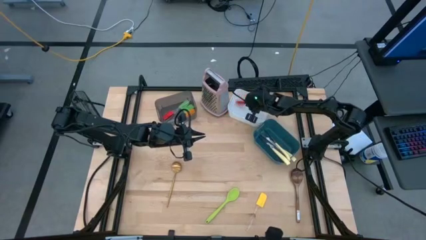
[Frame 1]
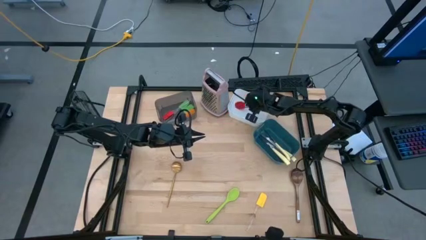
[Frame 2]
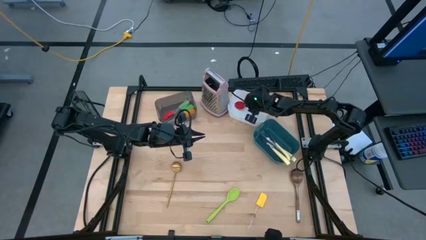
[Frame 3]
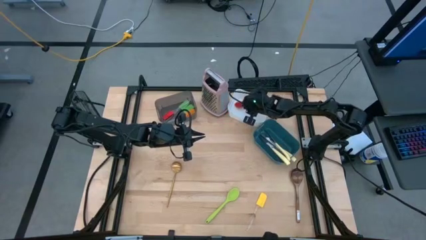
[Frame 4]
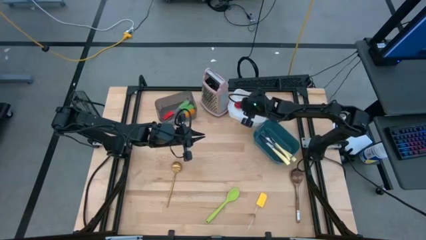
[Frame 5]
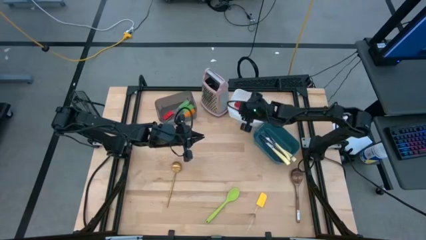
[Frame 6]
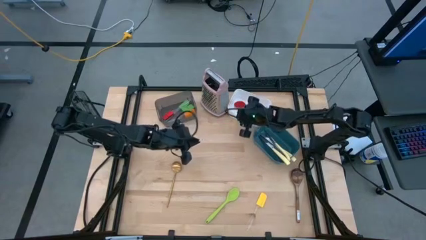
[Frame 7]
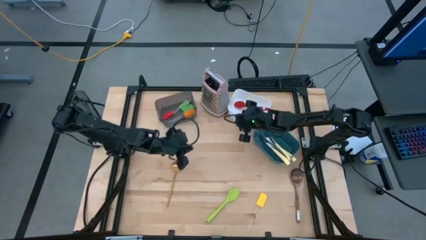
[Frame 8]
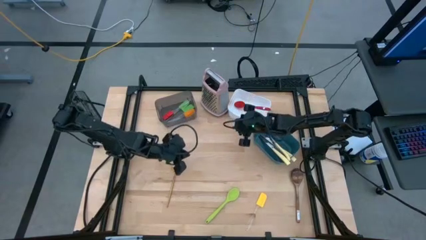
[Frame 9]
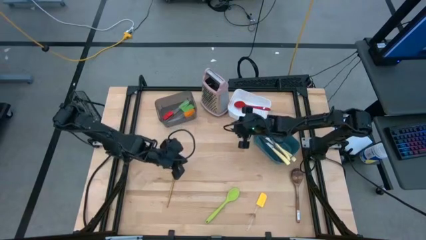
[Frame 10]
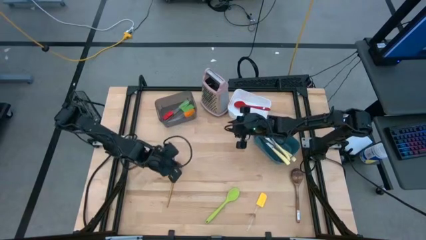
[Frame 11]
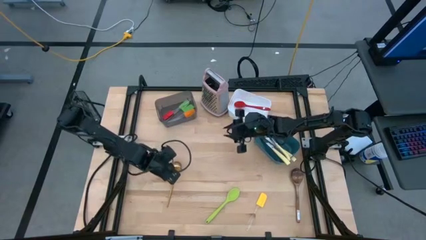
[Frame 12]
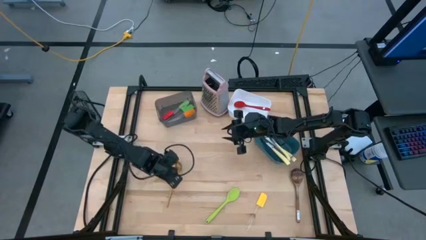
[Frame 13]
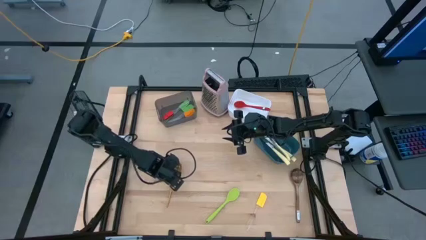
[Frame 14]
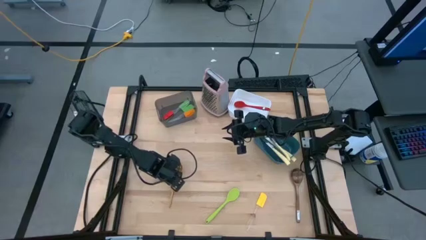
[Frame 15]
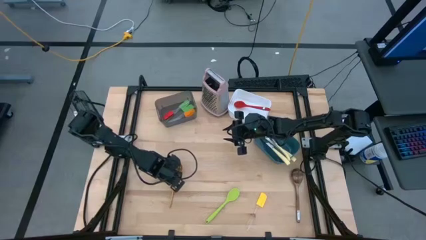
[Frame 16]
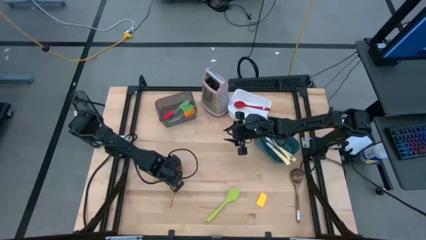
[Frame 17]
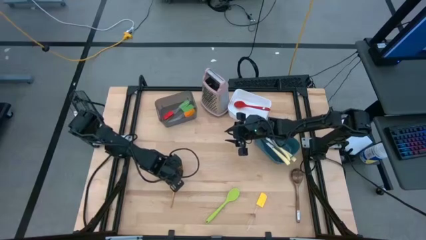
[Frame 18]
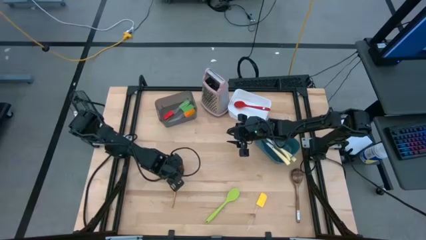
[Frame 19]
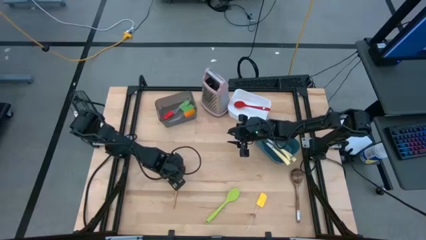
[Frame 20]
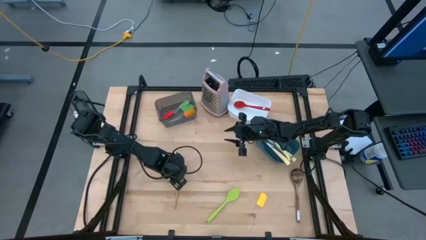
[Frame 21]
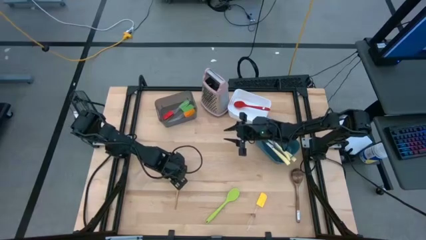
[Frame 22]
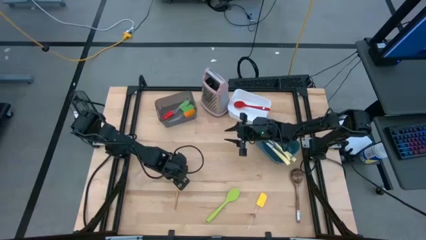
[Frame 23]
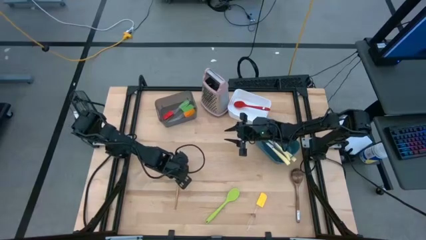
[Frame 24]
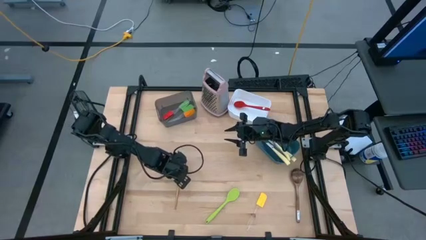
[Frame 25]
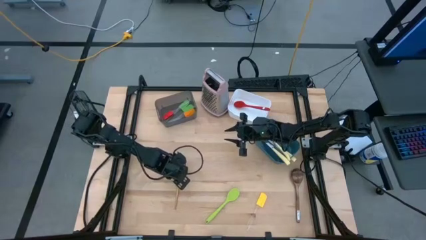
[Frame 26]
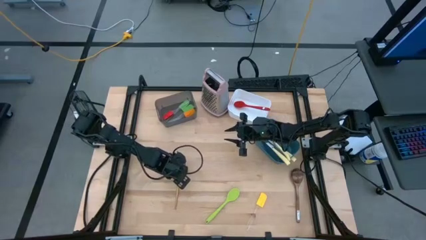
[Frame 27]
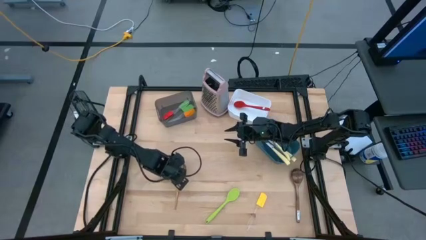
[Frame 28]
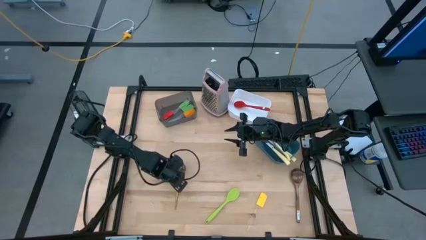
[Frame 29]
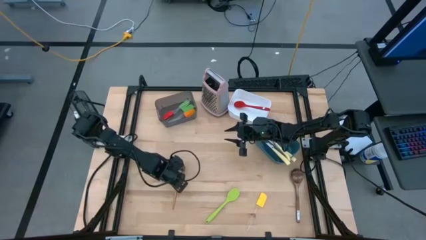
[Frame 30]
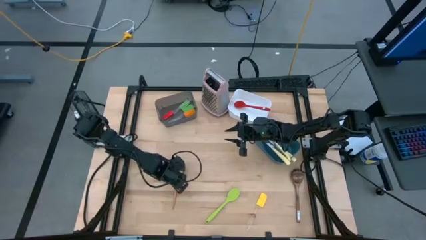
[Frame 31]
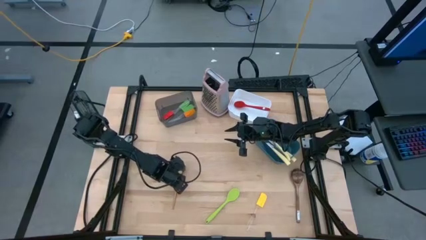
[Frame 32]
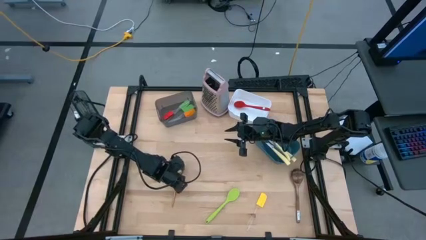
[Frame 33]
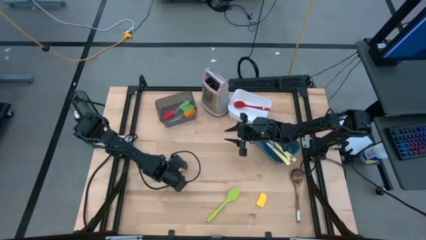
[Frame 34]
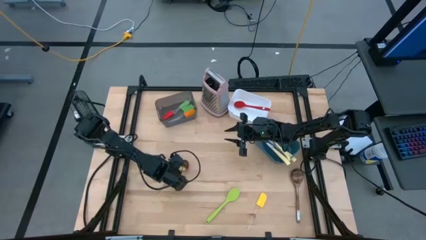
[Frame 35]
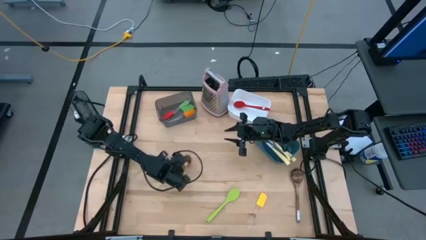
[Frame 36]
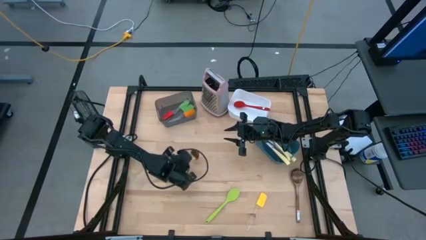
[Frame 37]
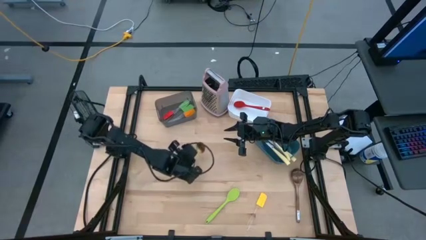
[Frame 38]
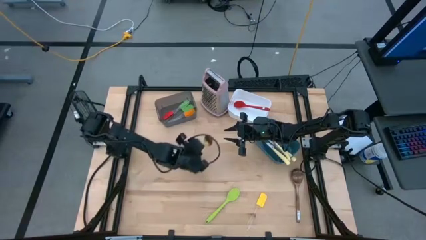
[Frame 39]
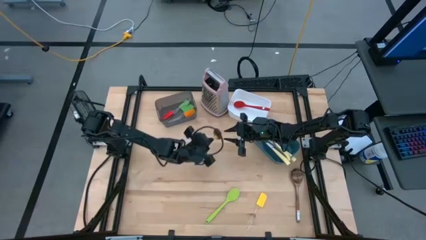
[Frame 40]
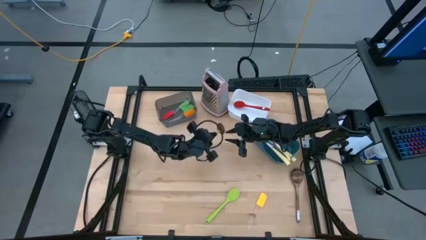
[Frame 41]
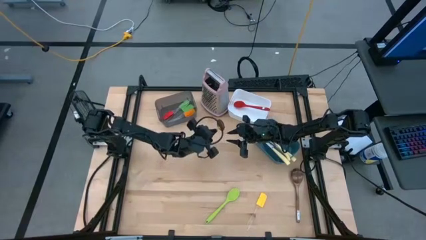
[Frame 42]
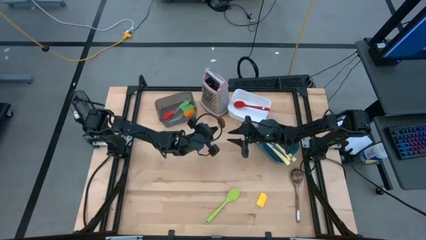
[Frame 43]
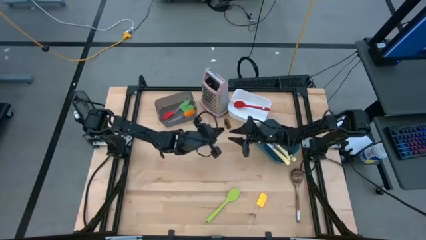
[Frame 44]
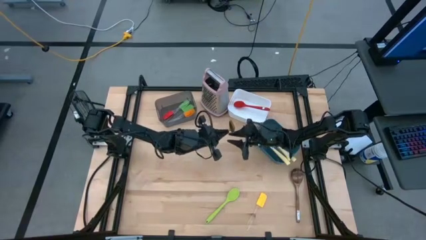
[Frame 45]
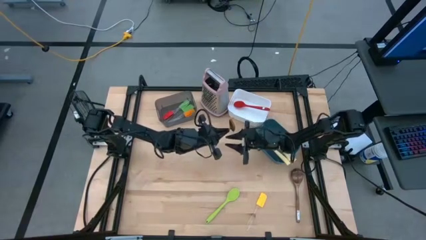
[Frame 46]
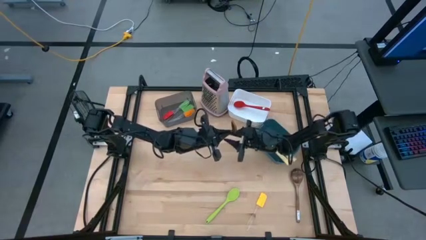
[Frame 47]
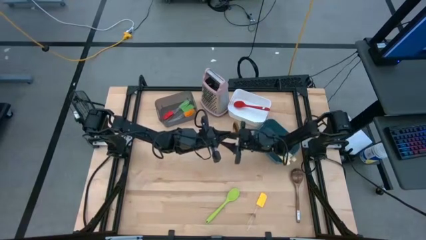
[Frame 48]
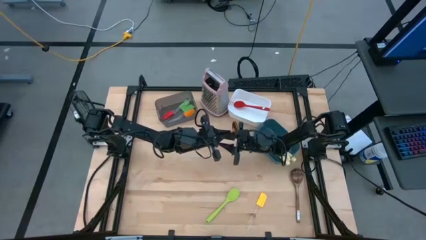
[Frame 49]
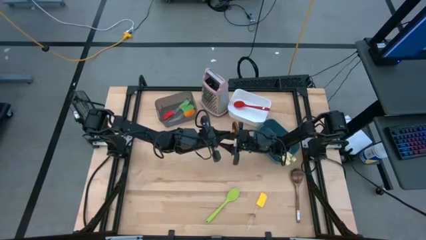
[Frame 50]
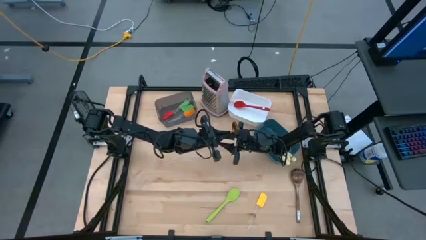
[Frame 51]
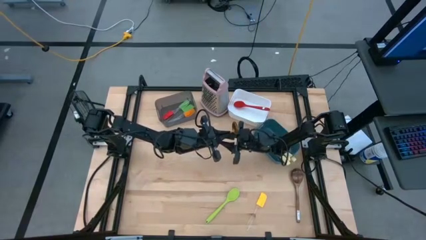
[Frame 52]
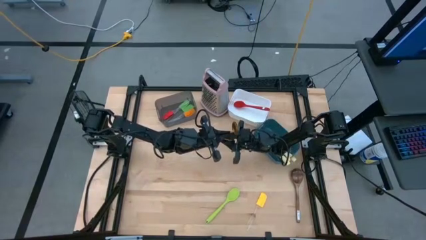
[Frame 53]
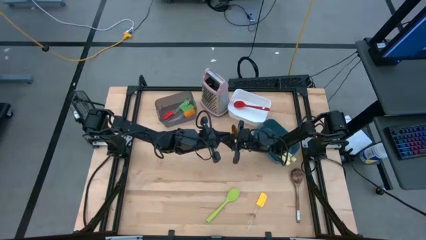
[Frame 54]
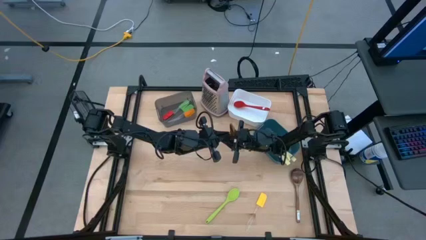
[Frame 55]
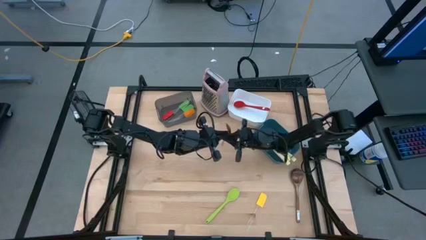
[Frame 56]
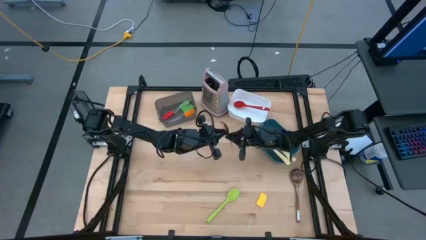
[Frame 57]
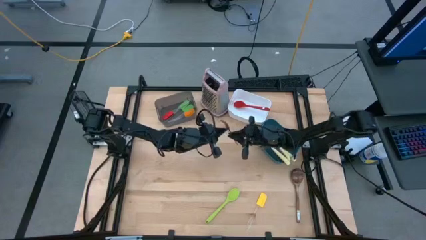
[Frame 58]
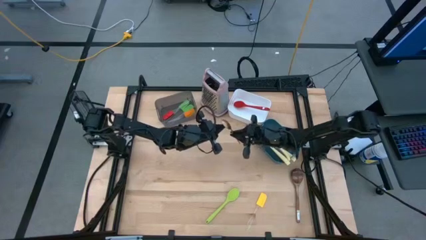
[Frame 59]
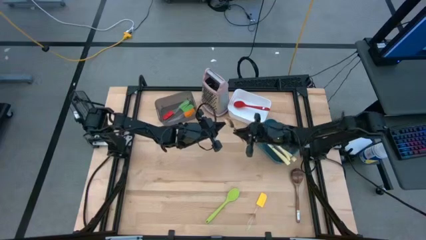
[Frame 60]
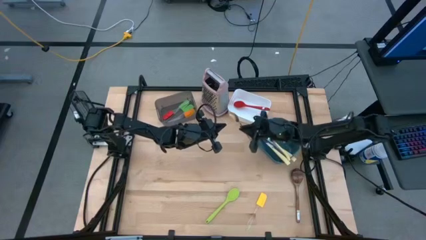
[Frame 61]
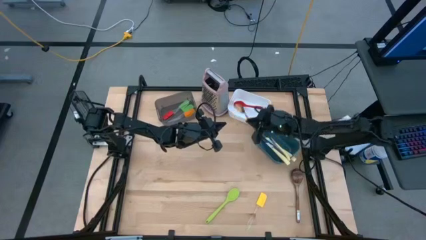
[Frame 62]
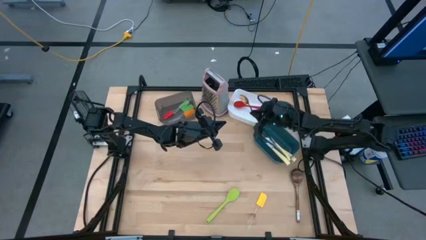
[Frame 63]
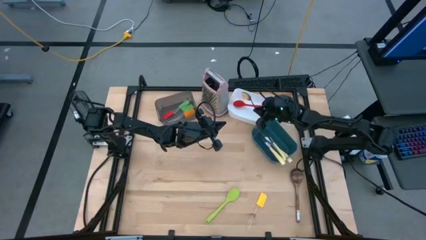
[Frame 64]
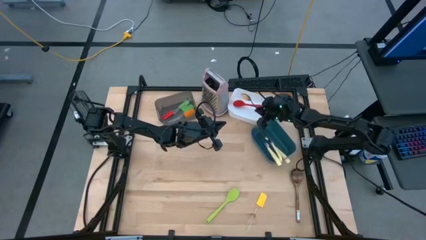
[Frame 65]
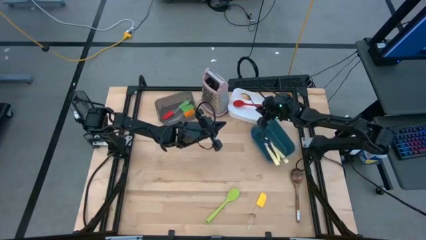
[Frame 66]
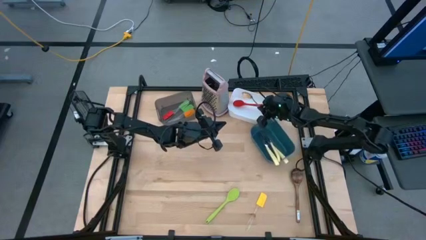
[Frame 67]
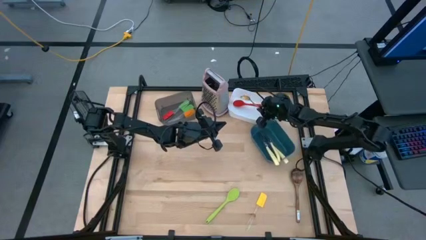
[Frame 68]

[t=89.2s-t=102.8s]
Task: Pick & Place Kitchen Items
Put the gold serving spoon into the white bin
